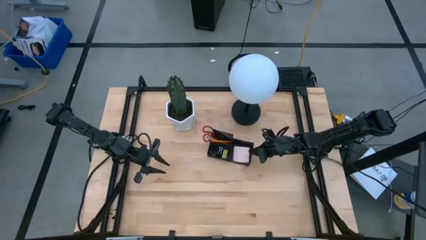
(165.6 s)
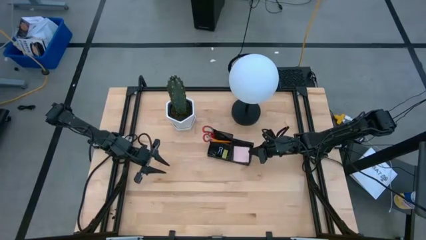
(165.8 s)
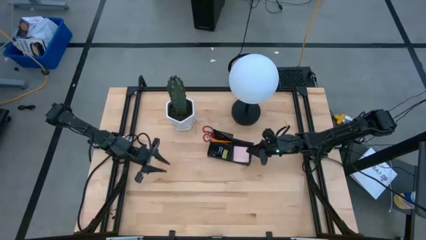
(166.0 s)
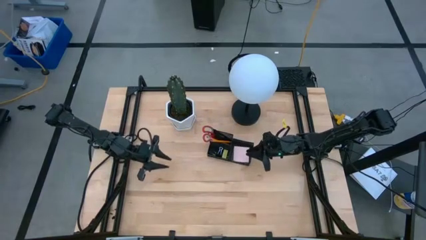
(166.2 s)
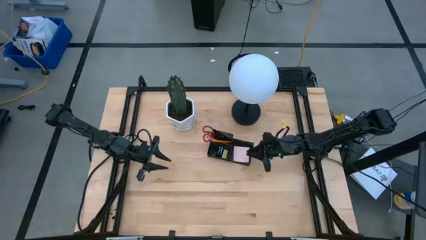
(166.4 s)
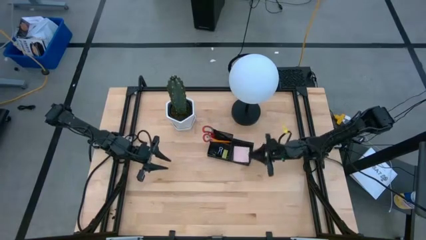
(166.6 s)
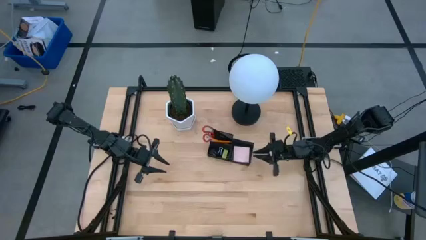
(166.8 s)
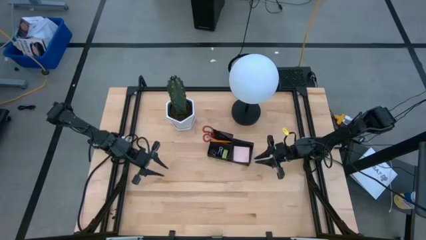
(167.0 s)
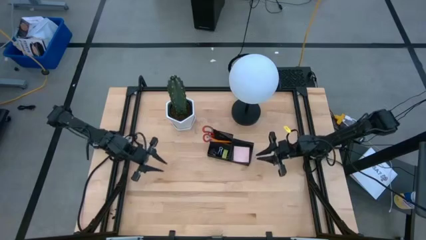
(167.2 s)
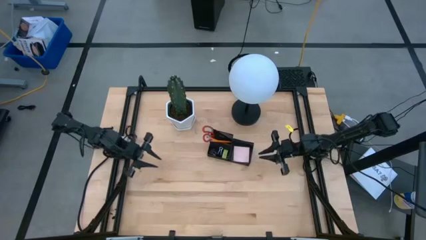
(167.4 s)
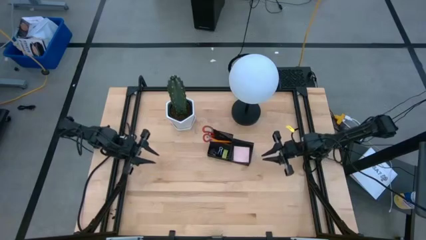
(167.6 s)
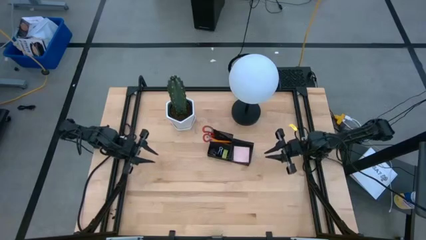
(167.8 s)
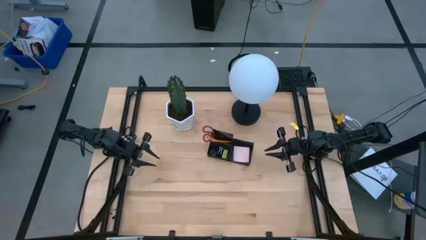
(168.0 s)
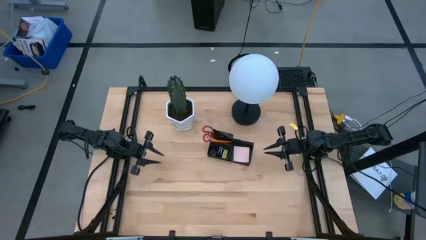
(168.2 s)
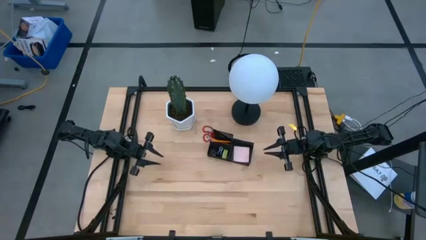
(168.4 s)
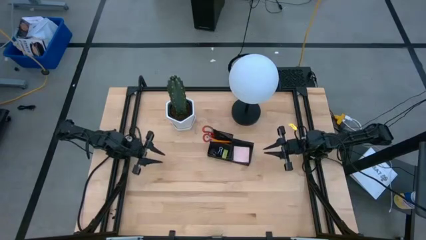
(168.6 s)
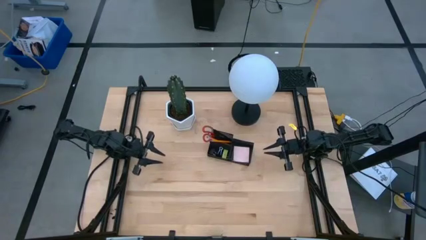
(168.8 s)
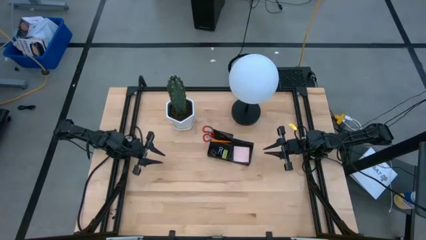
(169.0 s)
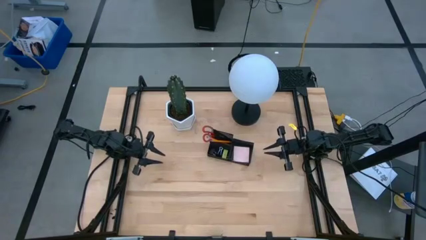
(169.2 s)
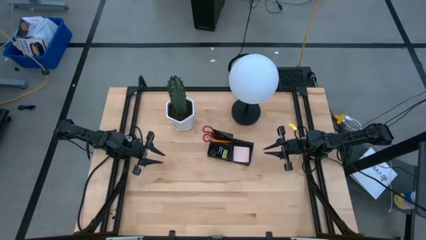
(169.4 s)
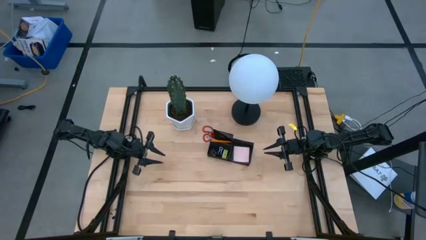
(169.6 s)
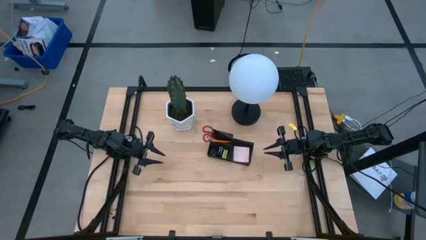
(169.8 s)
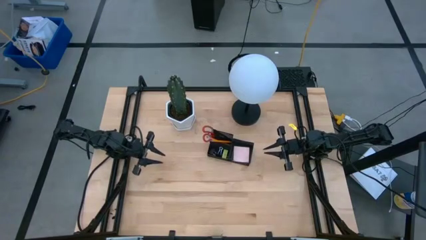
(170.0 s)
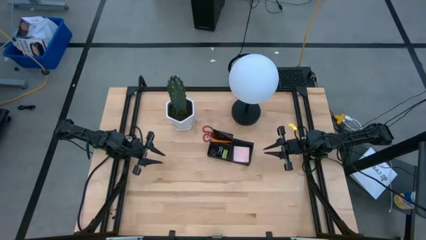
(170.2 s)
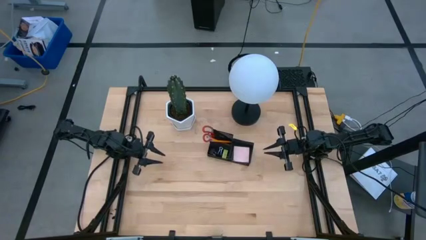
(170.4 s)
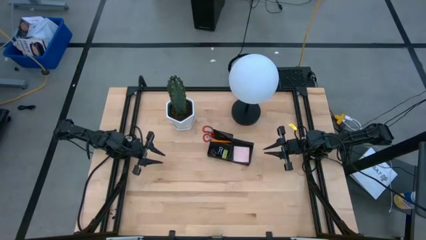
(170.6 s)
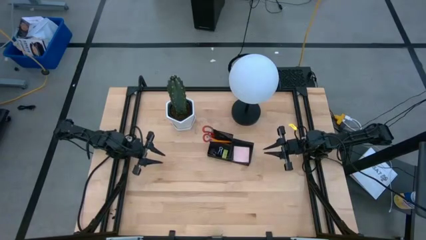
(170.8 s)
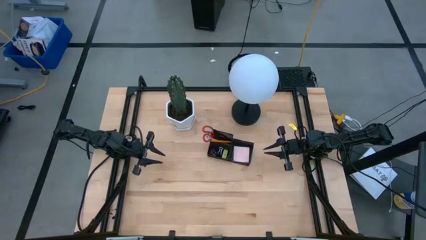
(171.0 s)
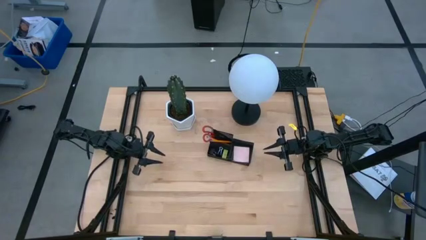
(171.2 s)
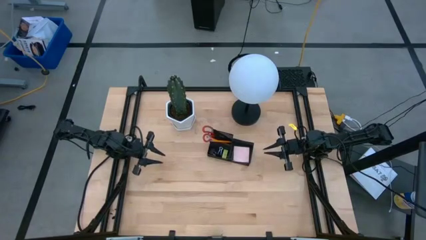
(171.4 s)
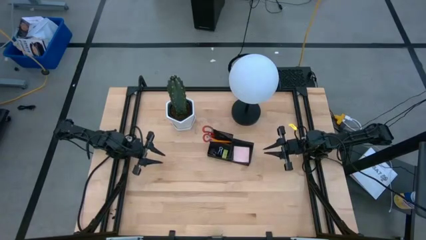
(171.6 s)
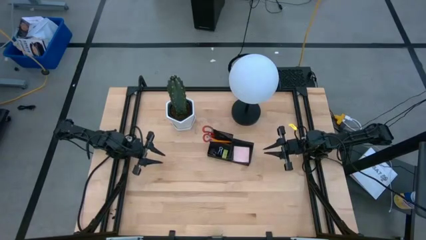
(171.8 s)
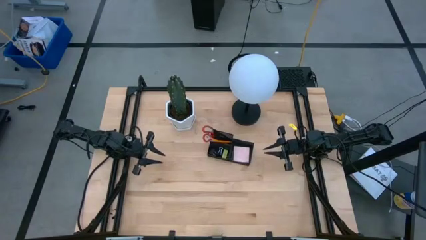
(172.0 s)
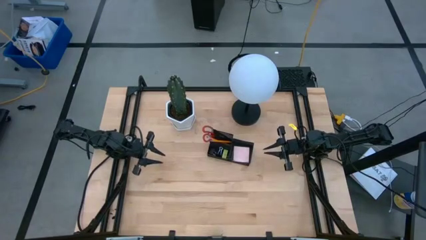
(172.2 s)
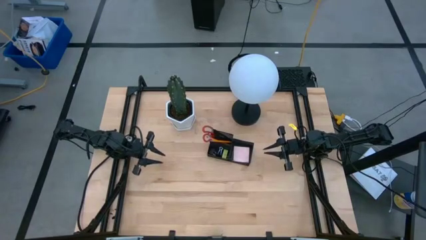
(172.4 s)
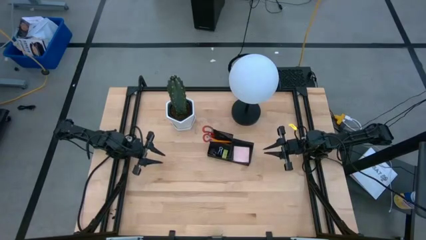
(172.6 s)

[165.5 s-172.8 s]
Task: Pick and place office supplies into organizer
Return to Home Position

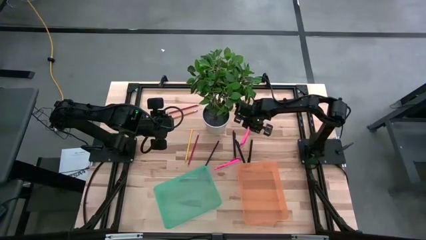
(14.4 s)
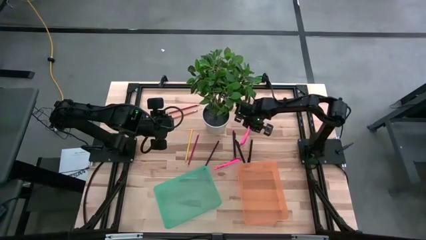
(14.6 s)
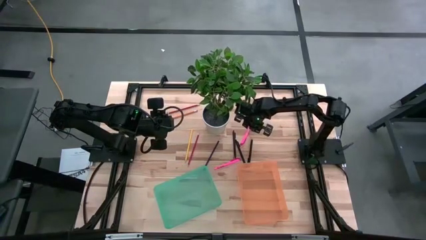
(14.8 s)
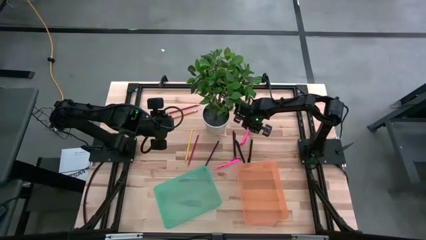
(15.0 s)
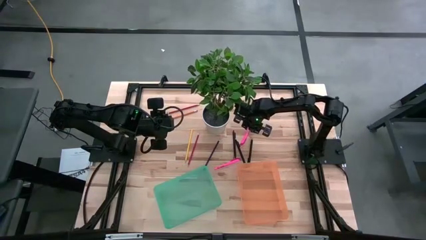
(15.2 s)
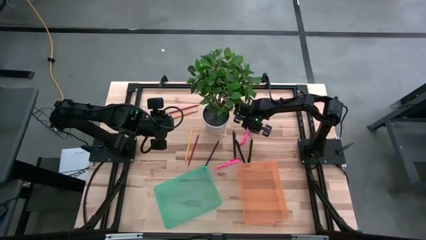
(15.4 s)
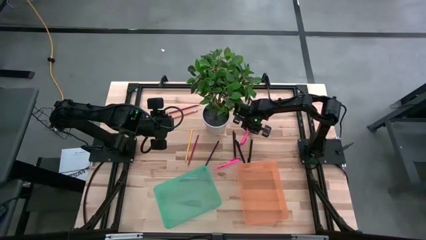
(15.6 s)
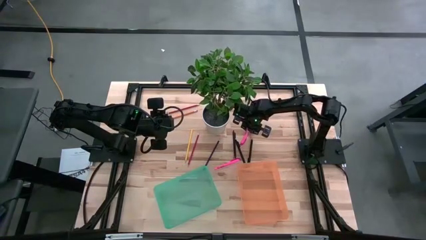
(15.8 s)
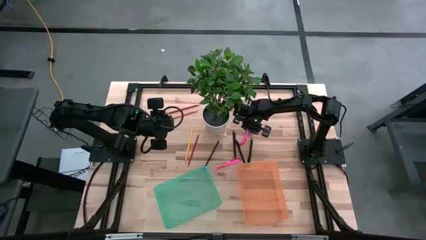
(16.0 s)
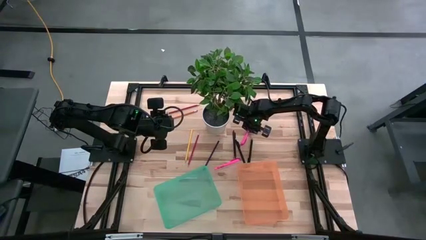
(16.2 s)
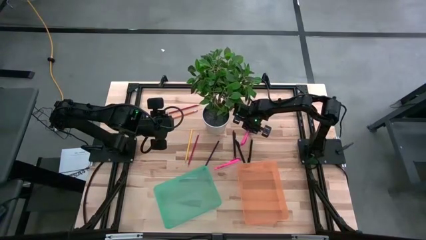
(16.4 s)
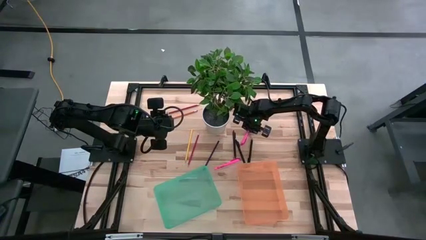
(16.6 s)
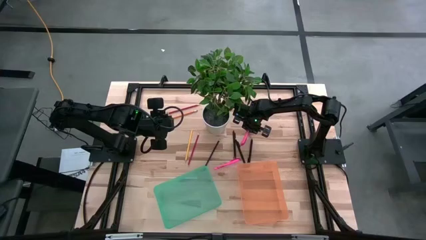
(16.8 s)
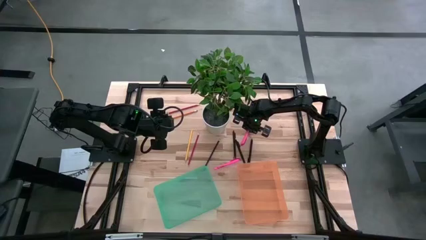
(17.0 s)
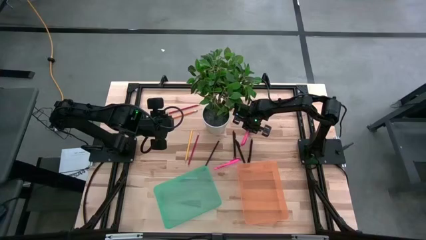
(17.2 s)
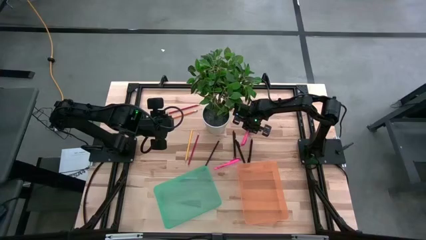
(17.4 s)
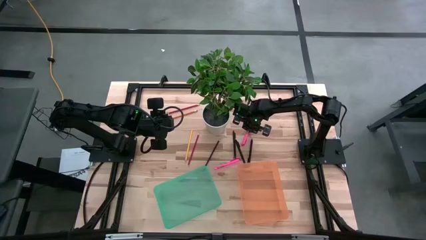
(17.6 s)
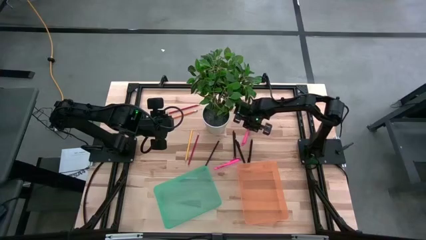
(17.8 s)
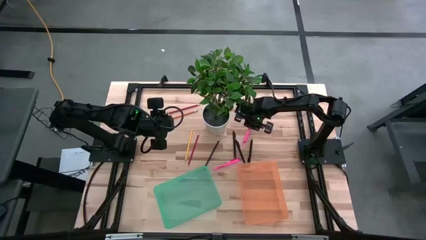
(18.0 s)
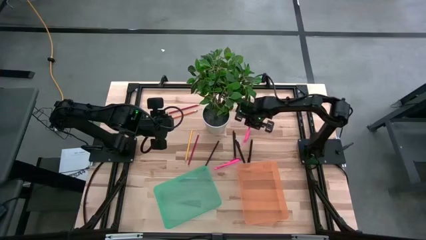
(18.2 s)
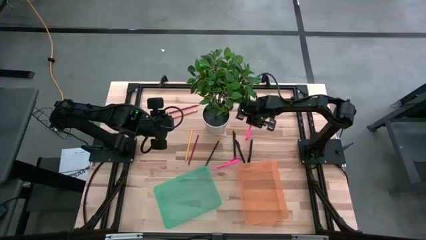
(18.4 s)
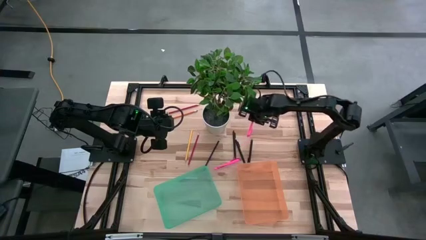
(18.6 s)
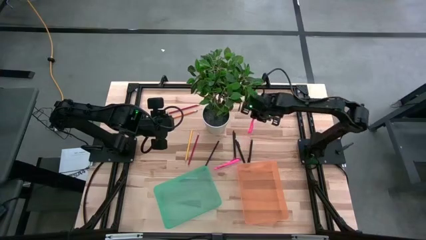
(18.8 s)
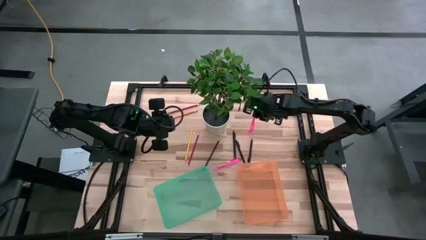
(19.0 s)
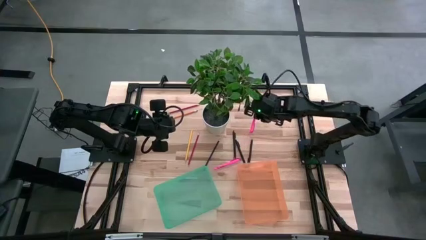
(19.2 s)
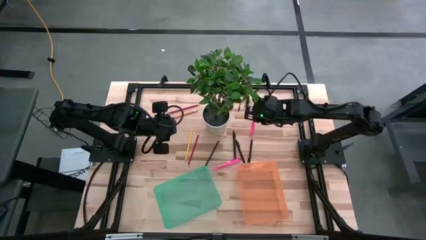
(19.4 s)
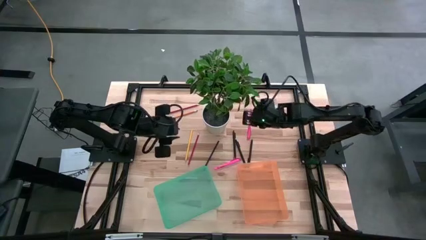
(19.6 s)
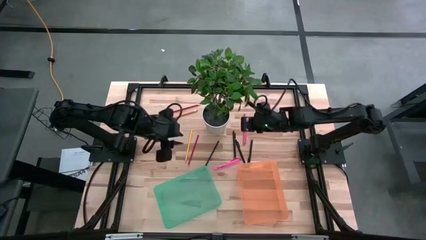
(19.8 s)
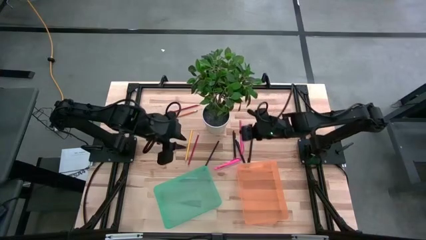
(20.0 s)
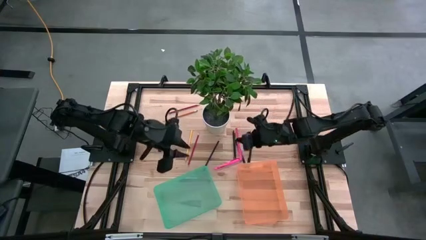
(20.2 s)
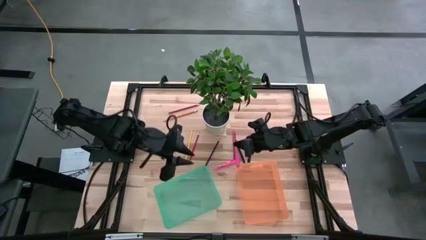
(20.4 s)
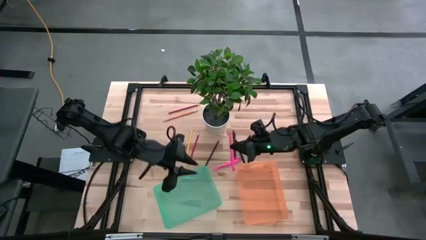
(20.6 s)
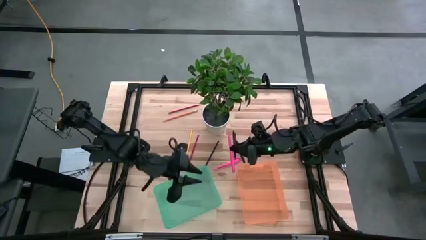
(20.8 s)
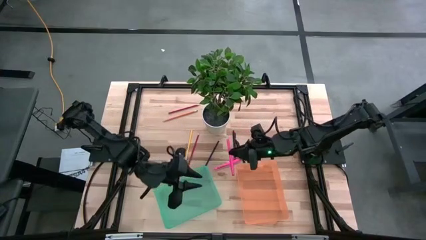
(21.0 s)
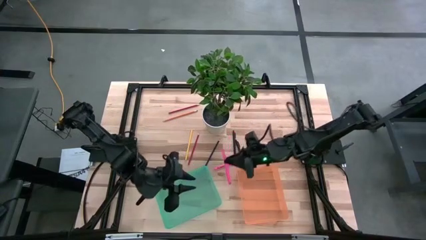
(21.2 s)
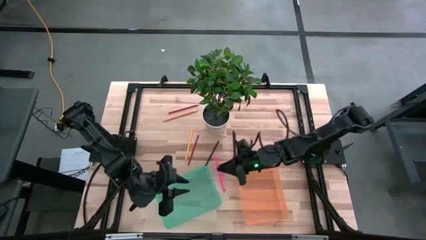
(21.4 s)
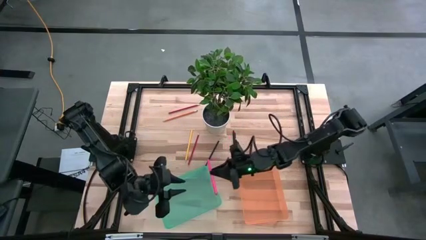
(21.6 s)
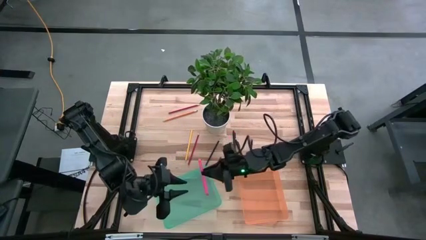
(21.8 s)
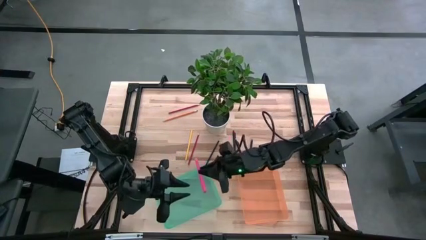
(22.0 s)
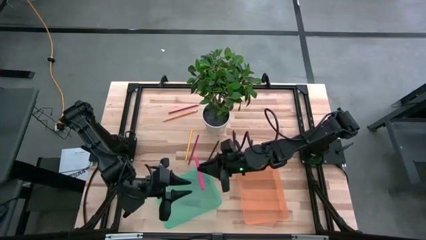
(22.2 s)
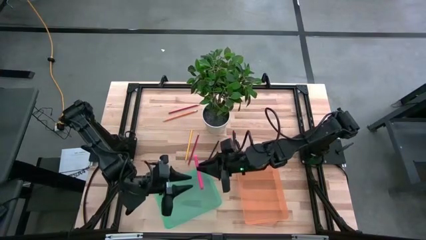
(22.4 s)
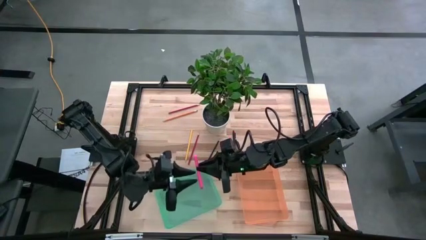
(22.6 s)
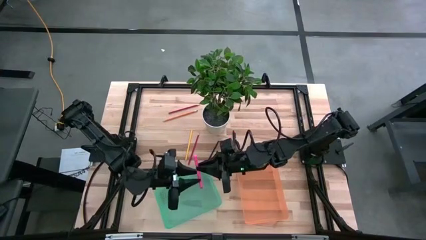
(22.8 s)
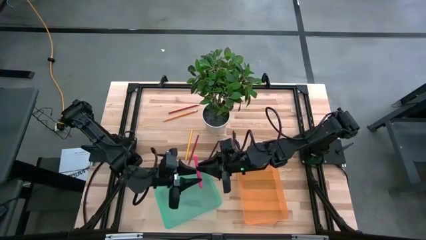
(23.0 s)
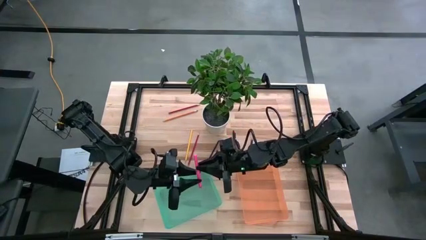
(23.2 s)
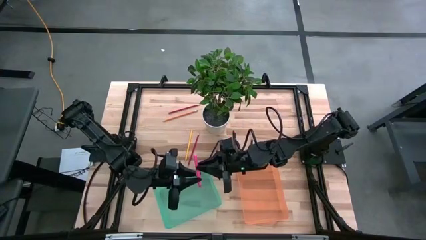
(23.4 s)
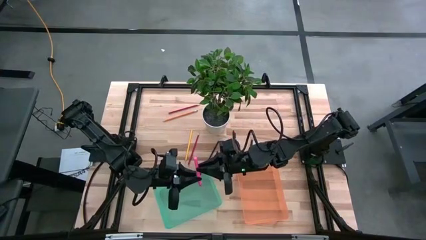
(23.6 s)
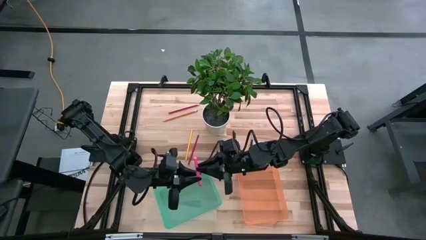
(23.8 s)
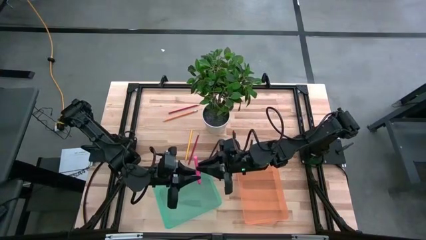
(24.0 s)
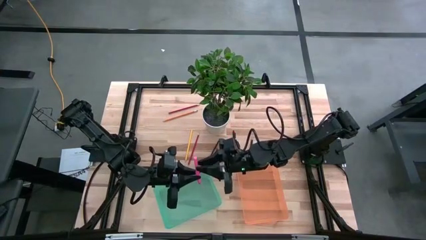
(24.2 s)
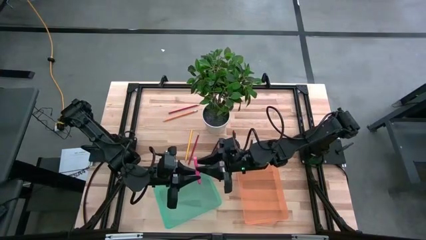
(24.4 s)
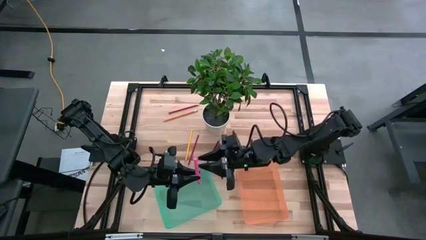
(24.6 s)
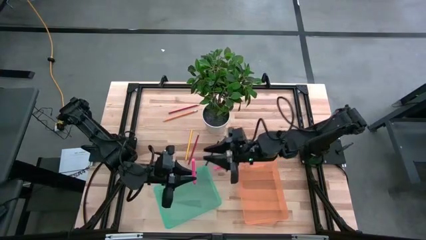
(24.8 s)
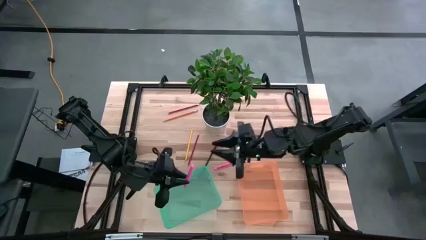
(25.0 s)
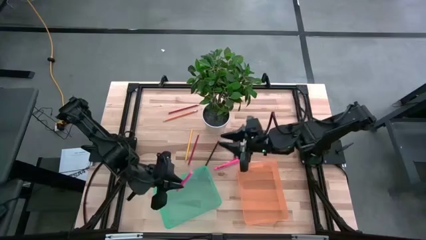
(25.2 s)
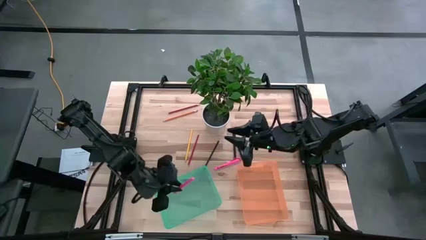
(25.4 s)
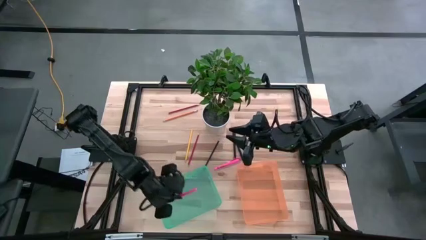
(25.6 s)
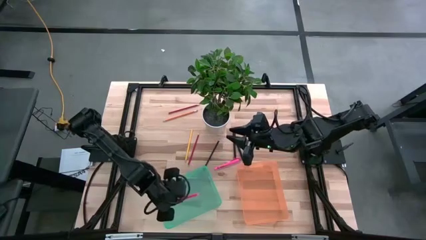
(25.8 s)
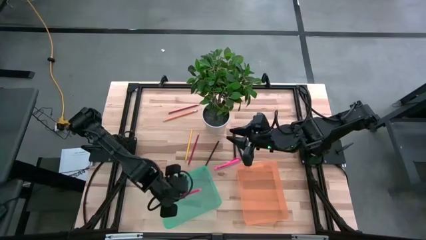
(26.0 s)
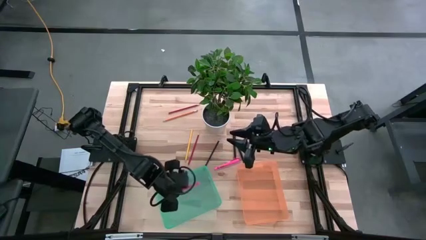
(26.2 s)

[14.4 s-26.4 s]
Task: Sort pens & pencils
Put the top right pink pen into the green bin
